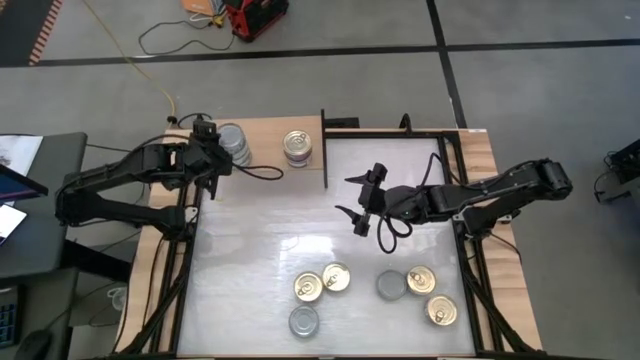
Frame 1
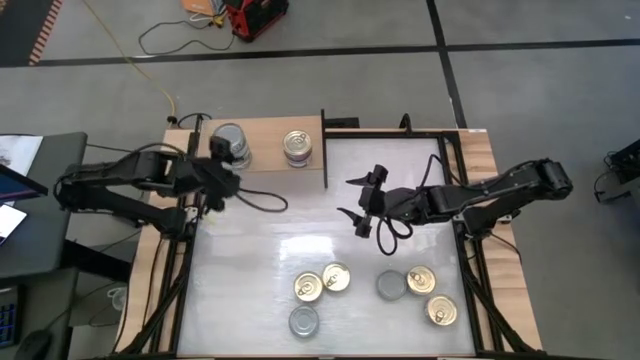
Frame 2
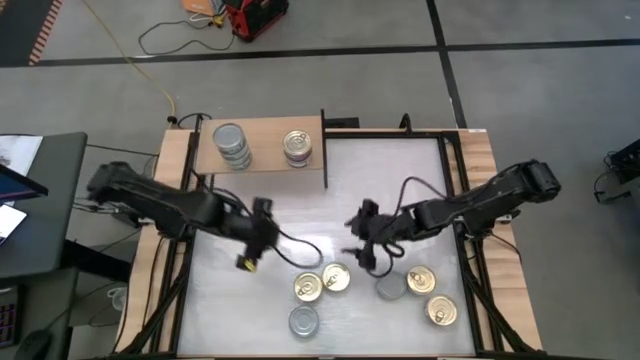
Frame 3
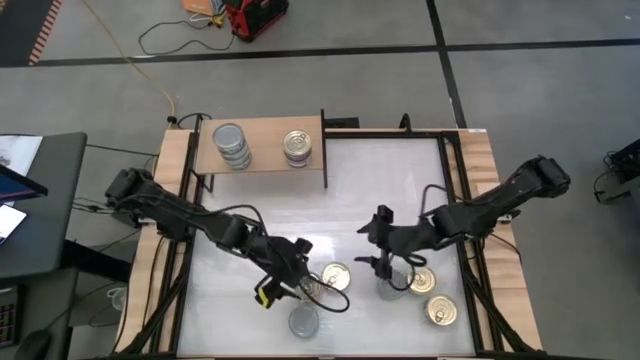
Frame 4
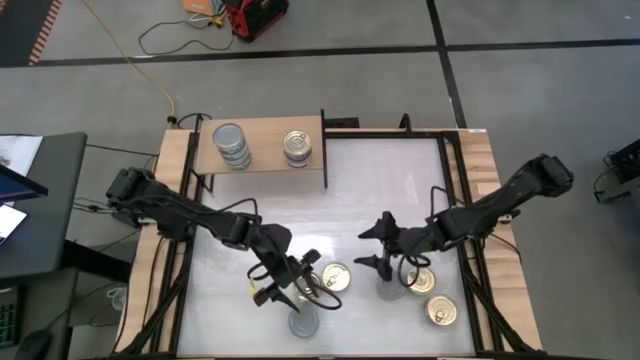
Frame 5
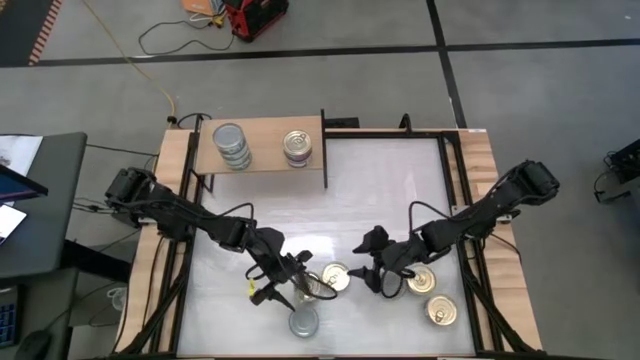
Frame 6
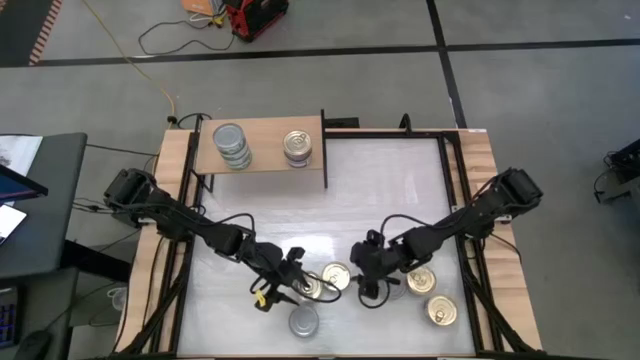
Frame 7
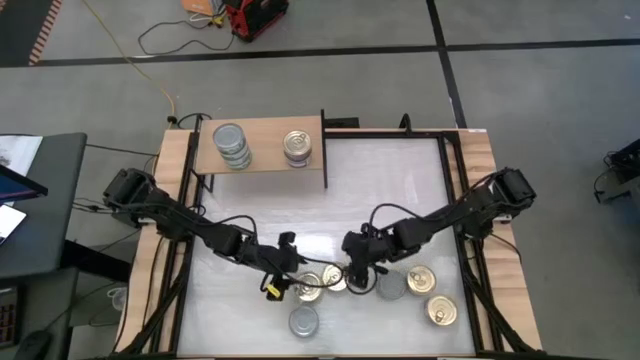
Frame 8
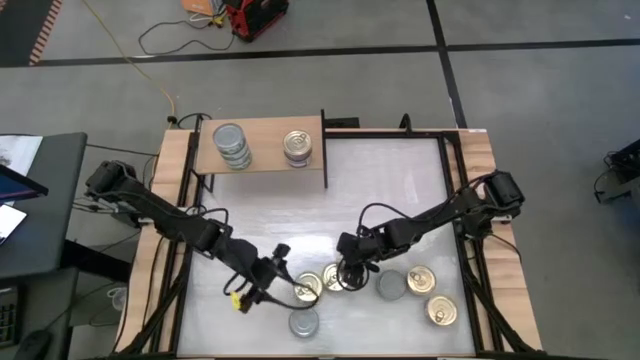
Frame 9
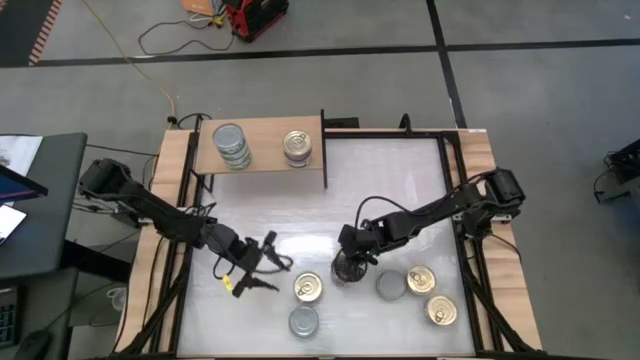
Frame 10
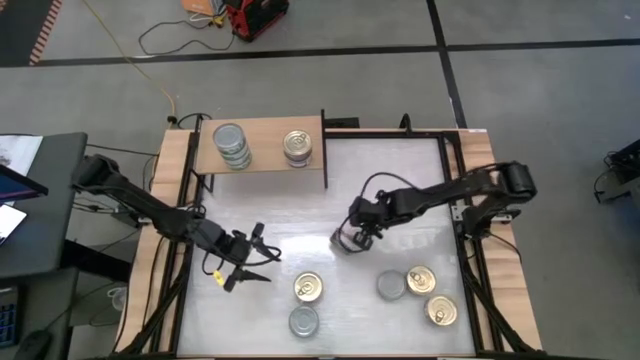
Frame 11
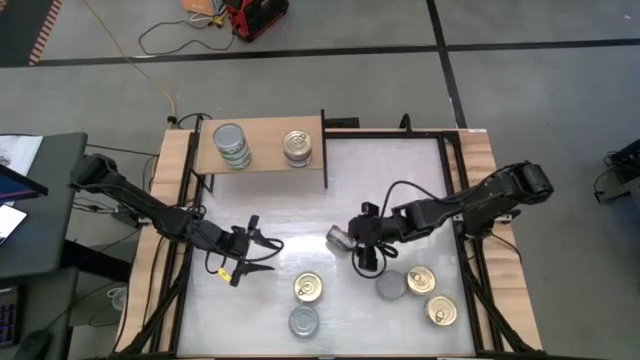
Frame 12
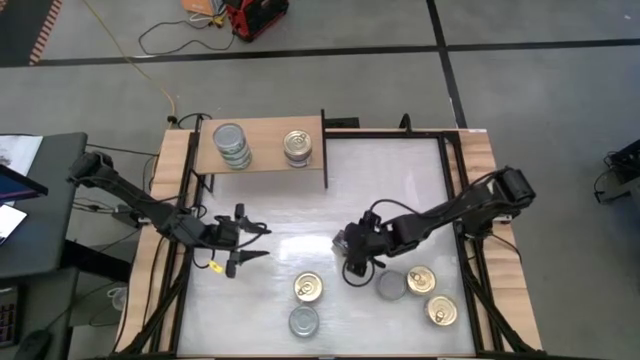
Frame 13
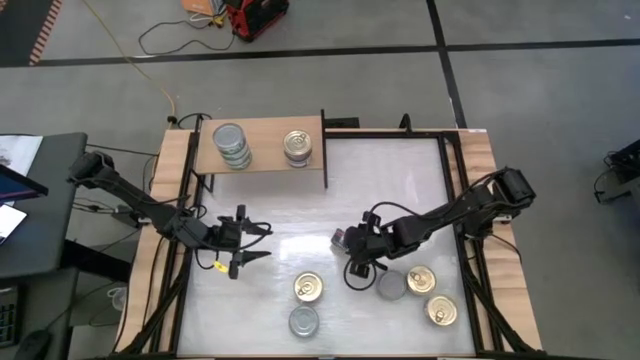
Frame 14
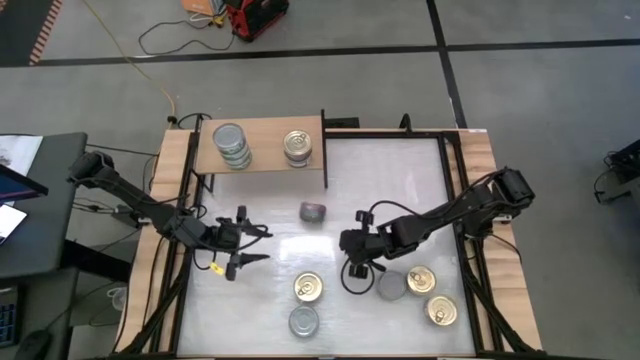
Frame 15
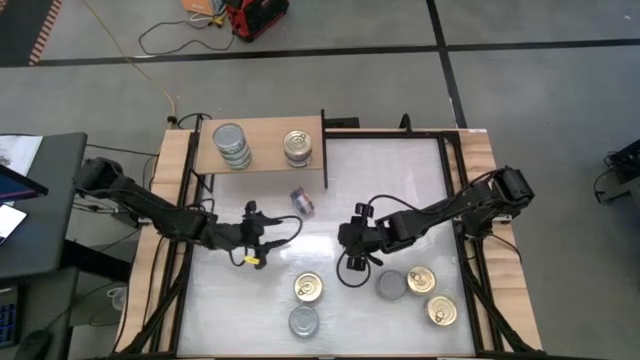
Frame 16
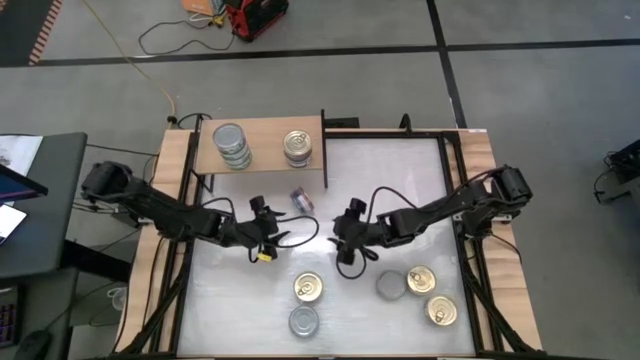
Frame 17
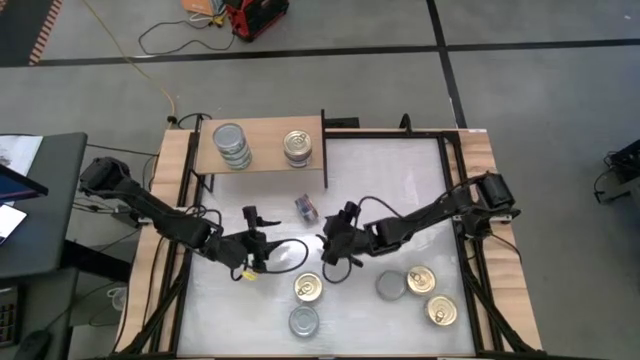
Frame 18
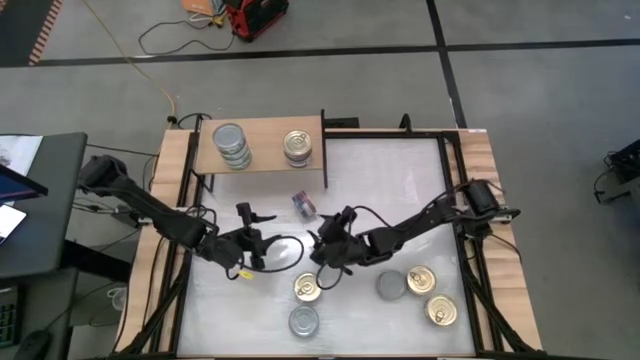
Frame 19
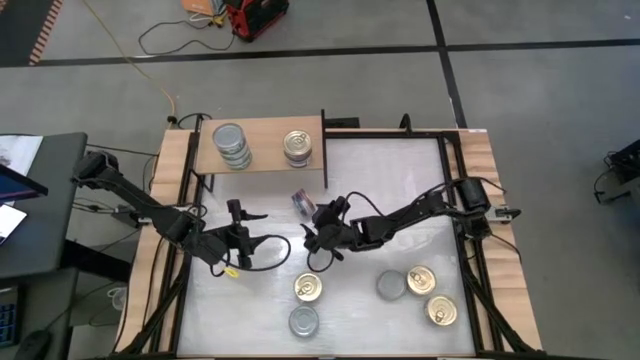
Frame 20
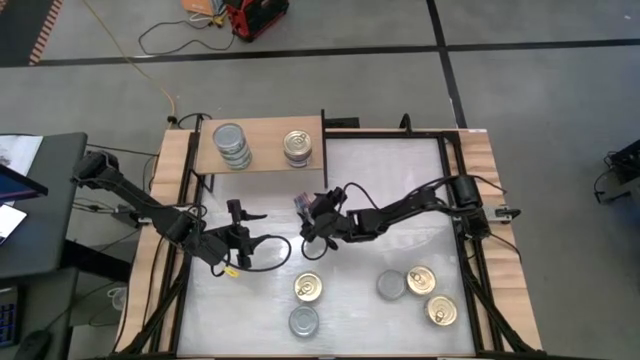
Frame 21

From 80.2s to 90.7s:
Task: Stack canned seafood by type on shelf
Stack the blue-pink tuna can on top of the other blue-pink tuna cans on the shelf

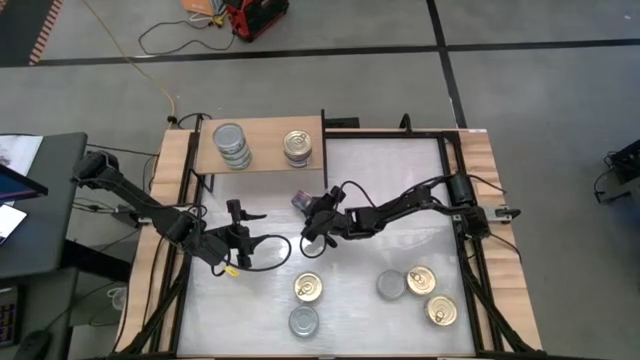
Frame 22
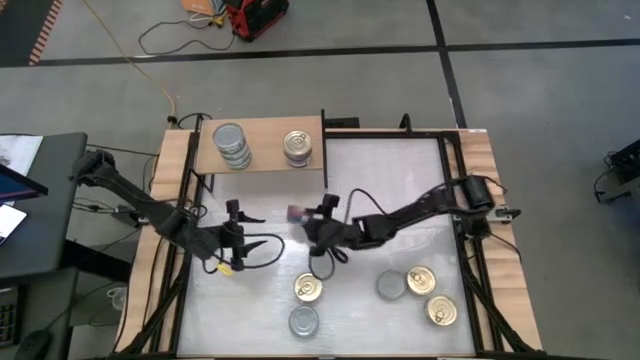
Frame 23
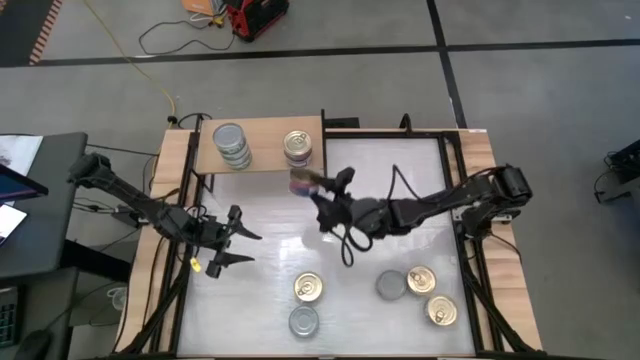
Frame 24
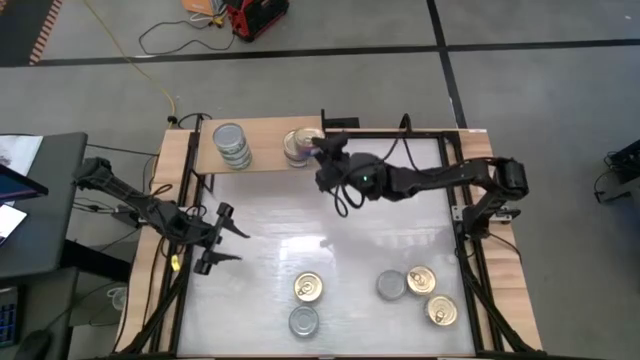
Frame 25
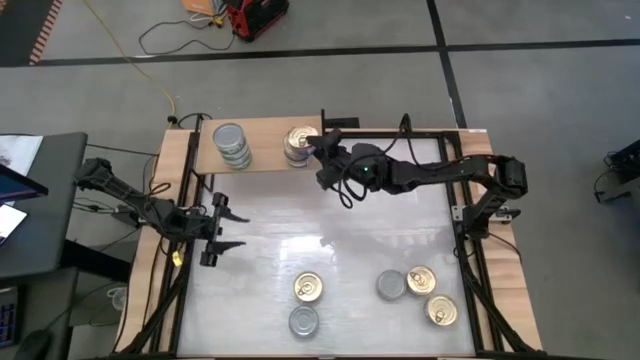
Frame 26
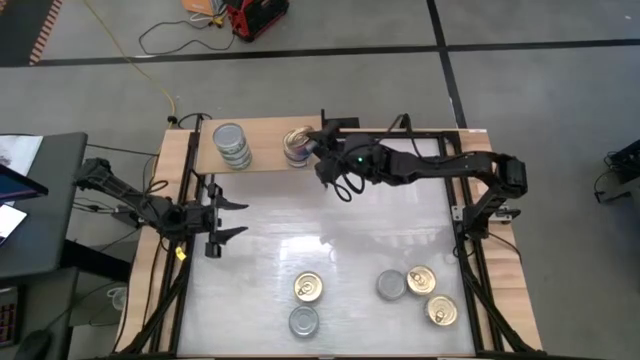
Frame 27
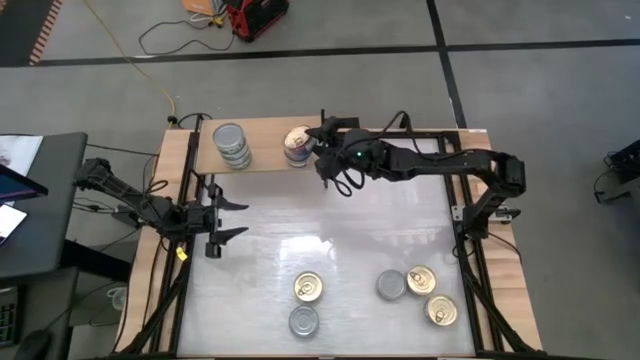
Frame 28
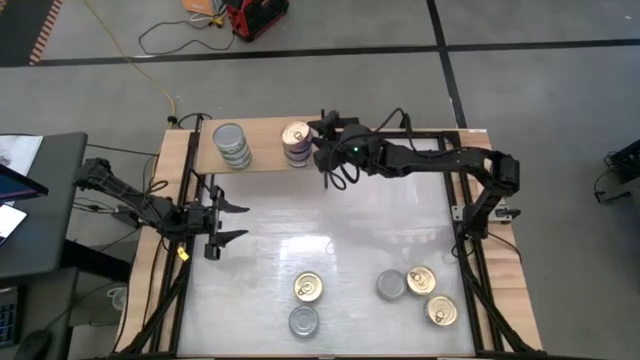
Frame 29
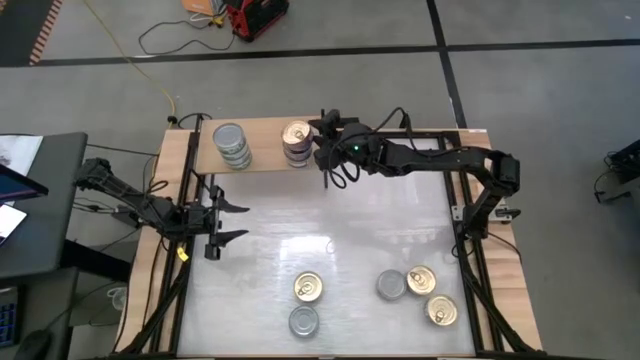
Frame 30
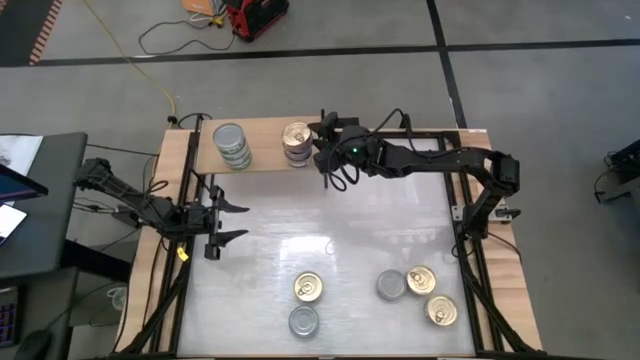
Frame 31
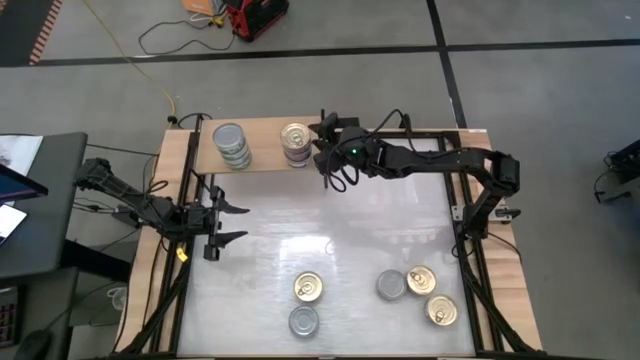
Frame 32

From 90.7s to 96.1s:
Stack the blue-pink tuna can on top of the other blue-pink tuna cans on the shelf

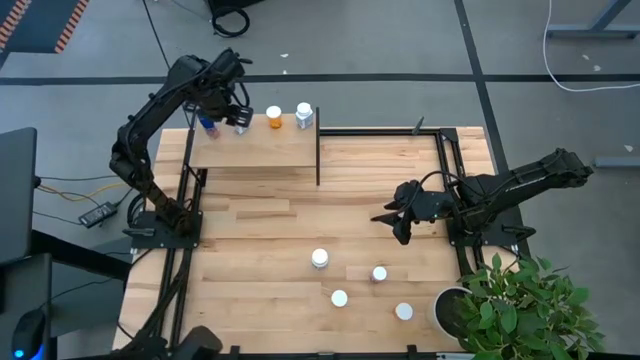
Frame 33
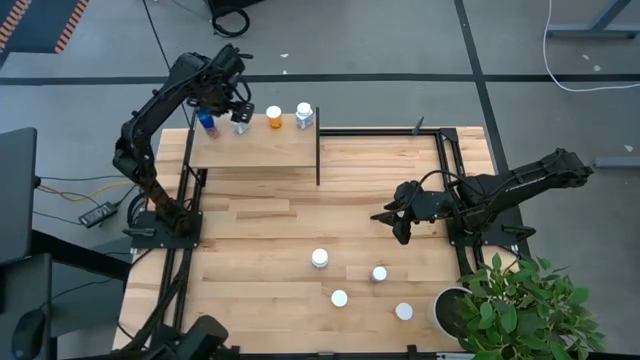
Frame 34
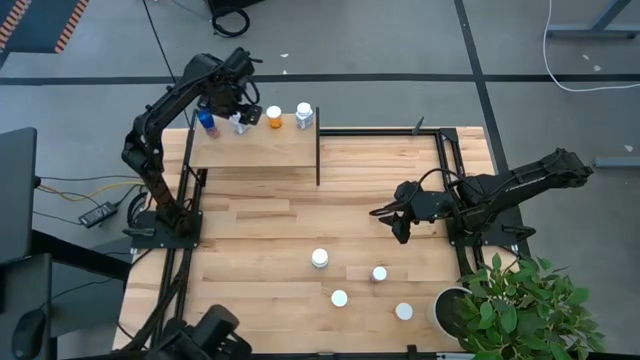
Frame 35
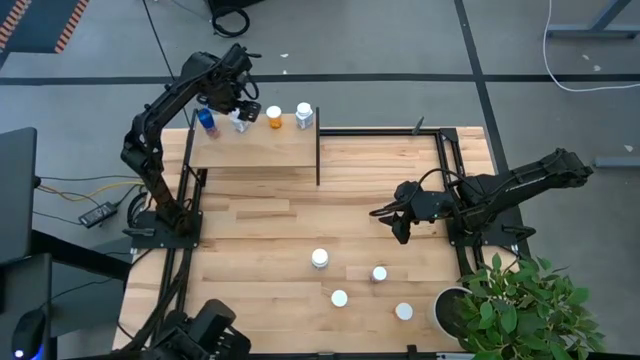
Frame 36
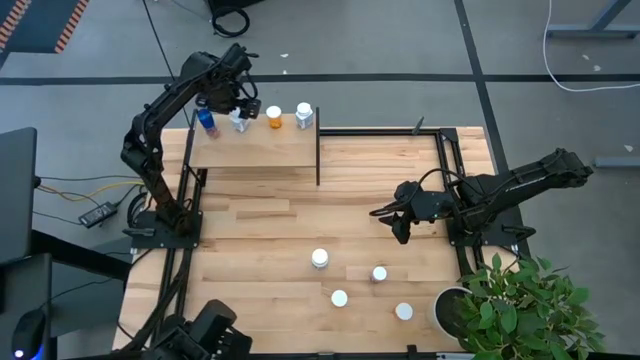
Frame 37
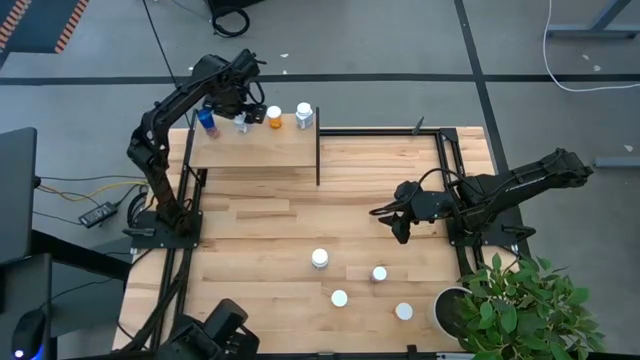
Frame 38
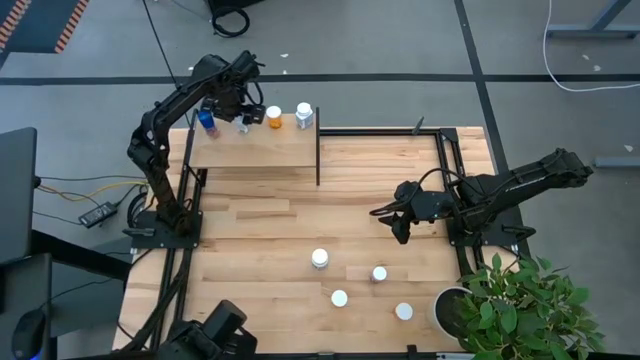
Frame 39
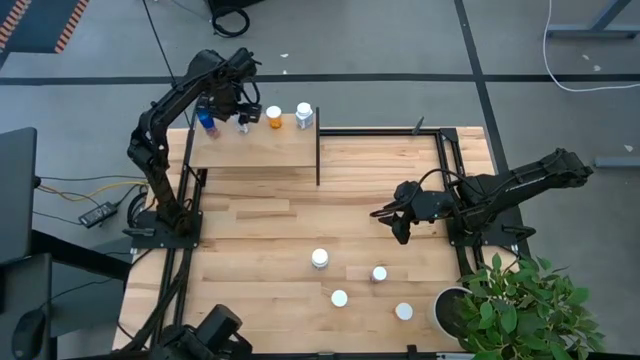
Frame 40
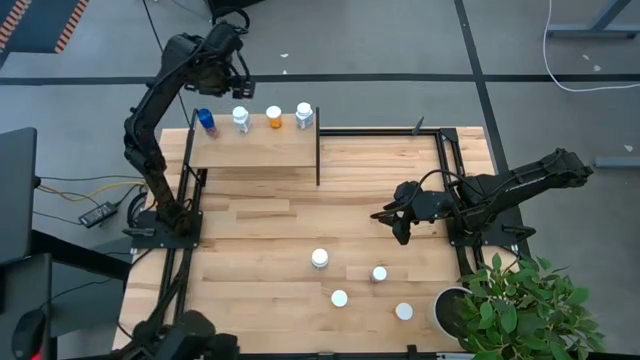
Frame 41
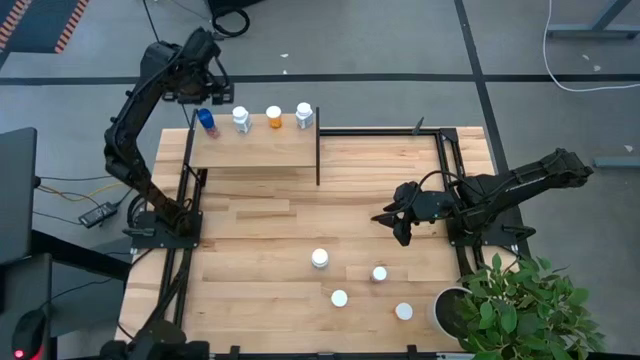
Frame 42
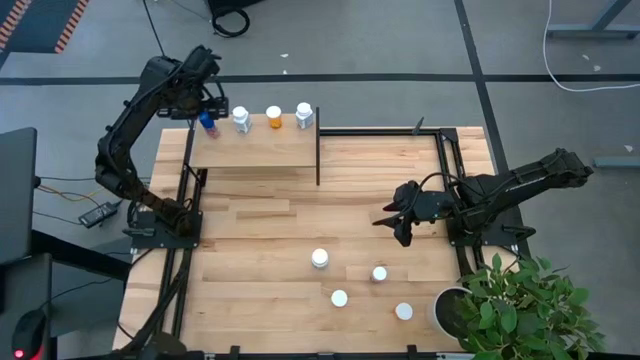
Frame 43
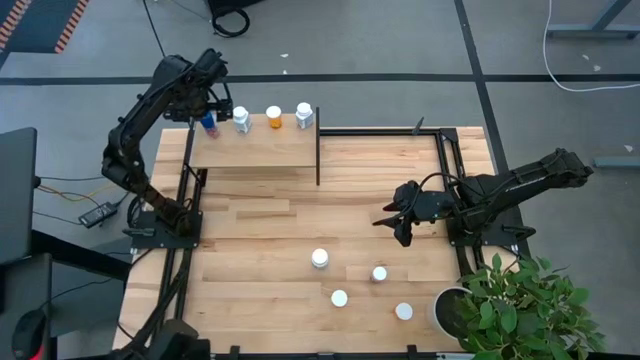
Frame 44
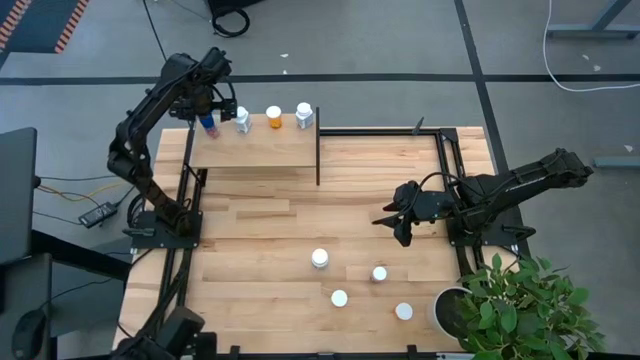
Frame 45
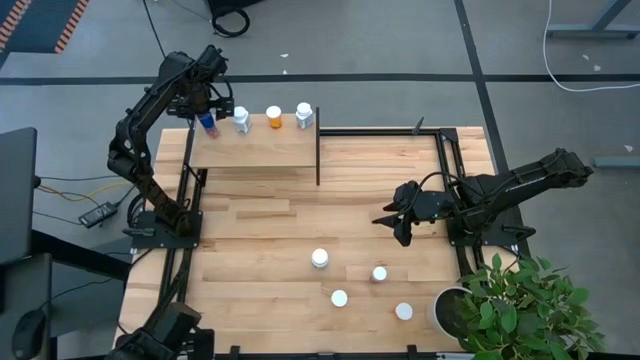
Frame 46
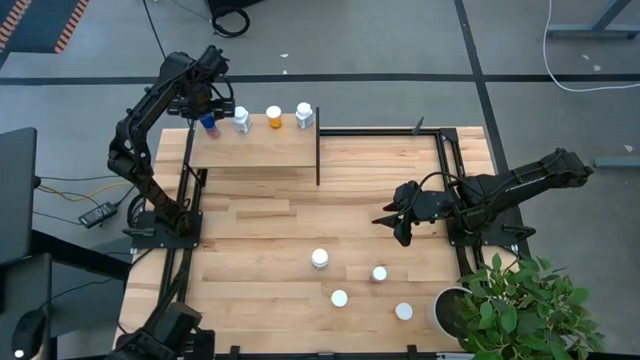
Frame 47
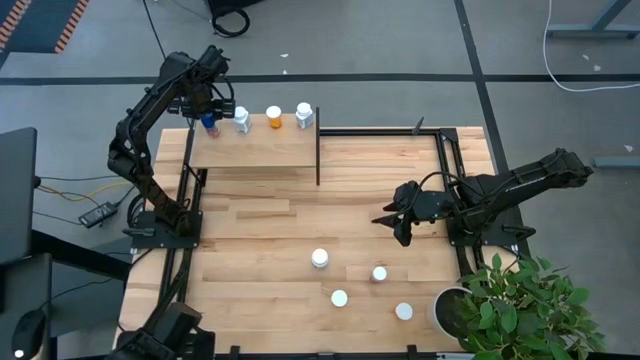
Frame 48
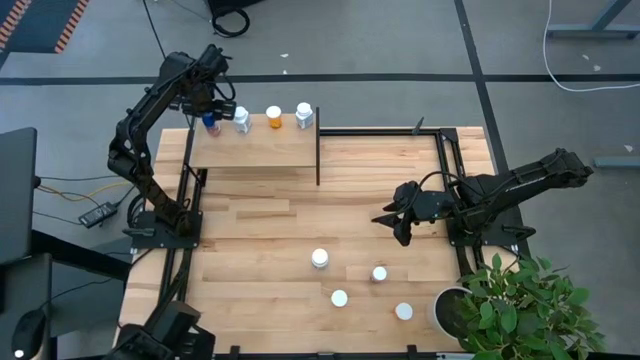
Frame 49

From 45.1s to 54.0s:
Task: Pick and place medicine bottles onto shelf by color
Adjust the pill bottles on the shelf
